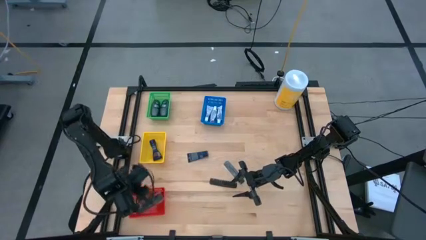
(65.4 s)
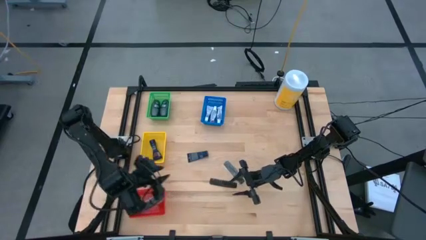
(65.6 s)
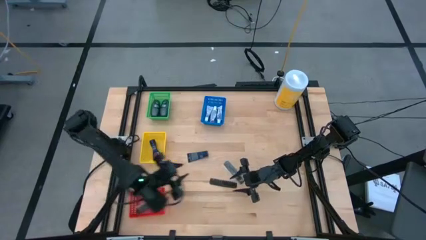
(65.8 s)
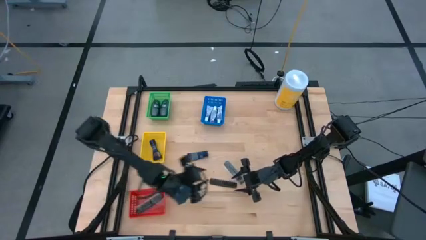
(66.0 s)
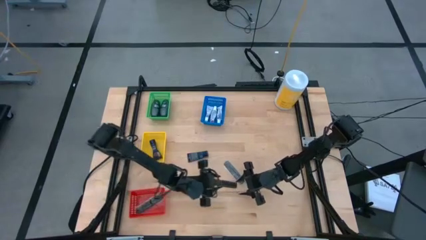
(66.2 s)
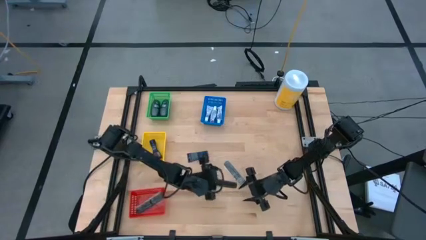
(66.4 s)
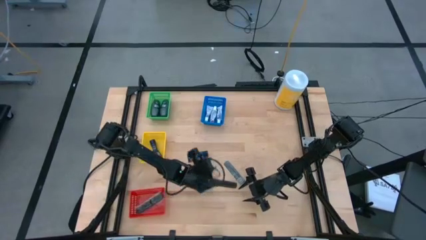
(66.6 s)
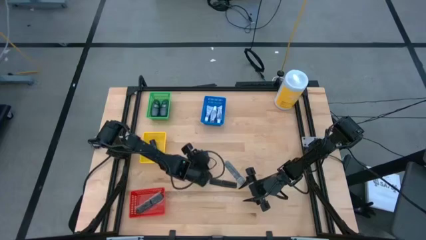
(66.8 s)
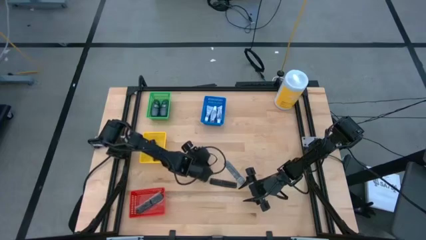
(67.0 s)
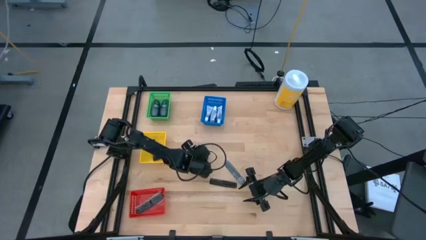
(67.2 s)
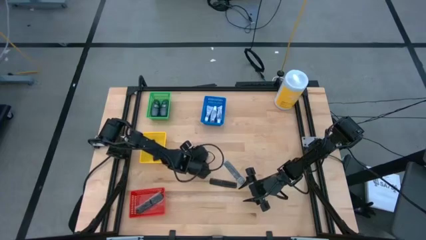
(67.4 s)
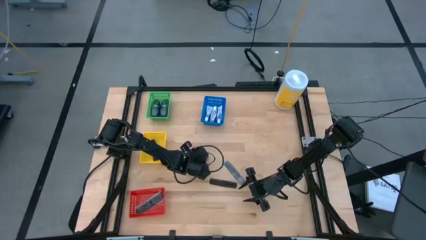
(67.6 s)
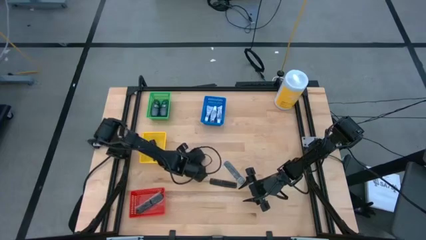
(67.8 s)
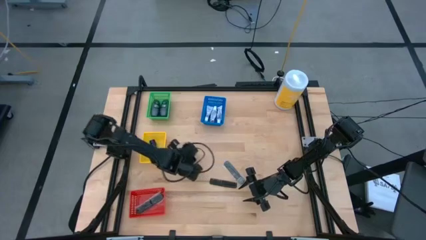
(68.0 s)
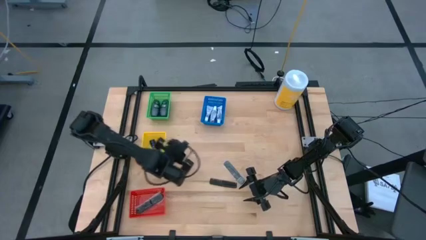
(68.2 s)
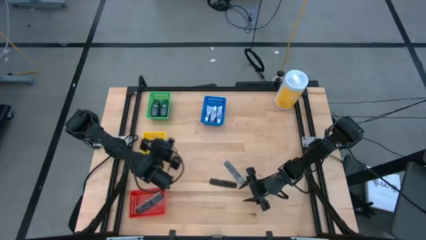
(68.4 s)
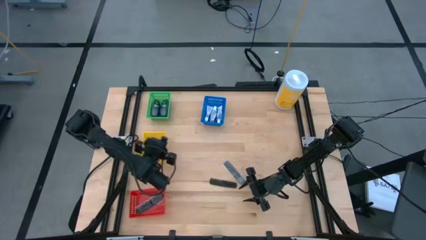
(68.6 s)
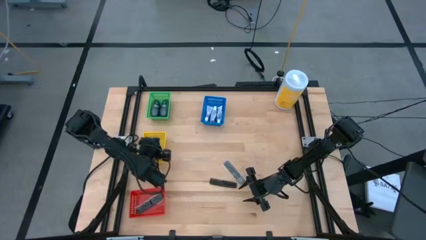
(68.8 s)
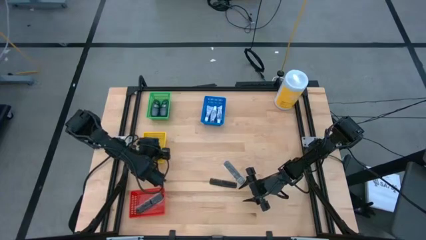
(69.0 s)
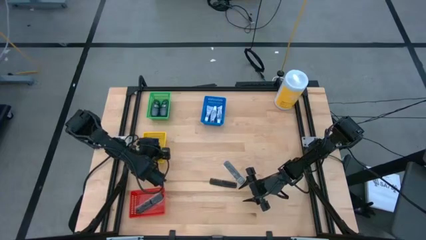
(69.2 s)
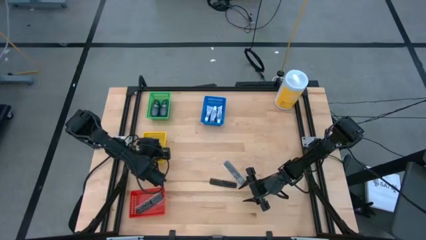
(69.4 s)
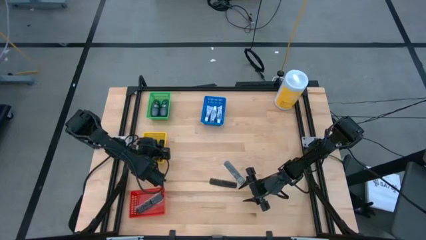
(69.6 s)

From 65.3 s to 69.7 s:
Task: Pick & Place Travel size toiletries
Put the blue shaving cream in the yellow basket

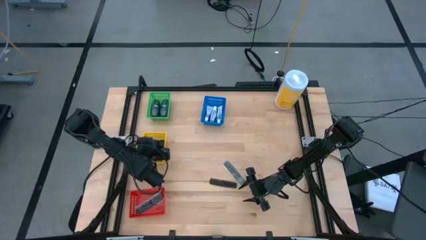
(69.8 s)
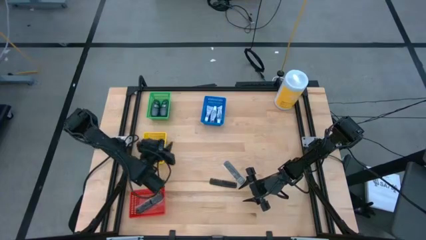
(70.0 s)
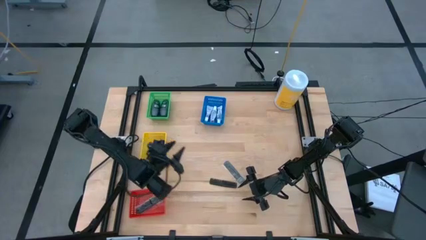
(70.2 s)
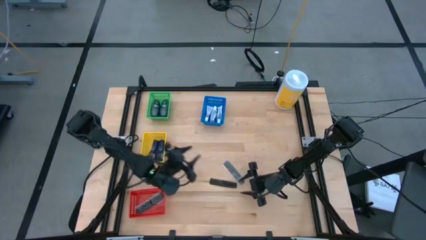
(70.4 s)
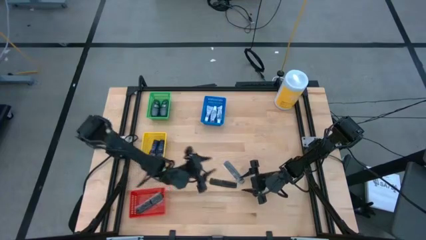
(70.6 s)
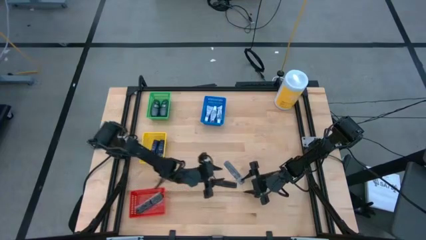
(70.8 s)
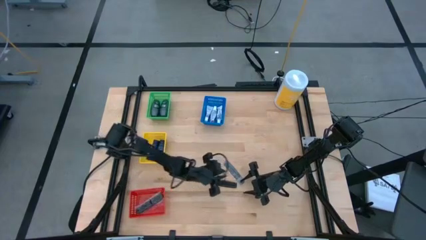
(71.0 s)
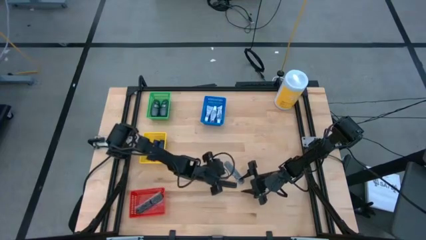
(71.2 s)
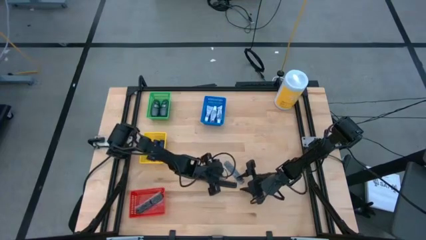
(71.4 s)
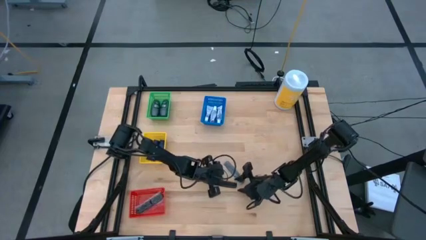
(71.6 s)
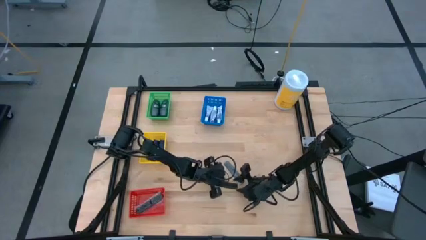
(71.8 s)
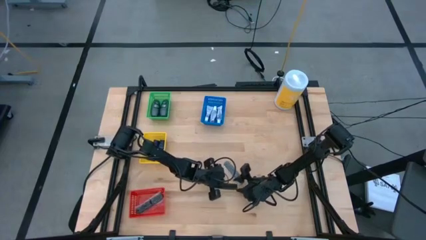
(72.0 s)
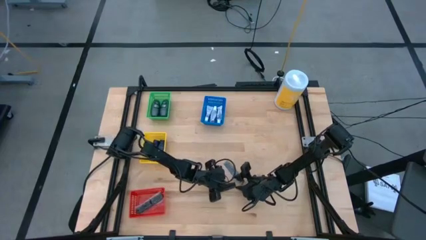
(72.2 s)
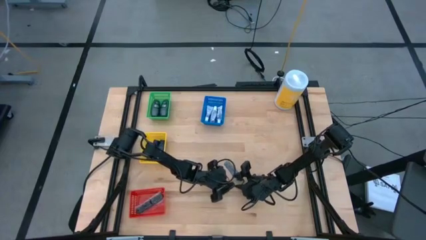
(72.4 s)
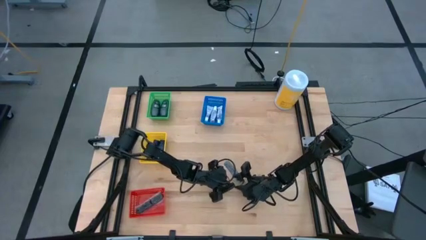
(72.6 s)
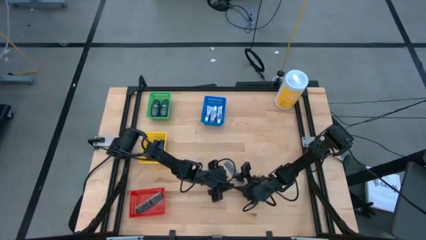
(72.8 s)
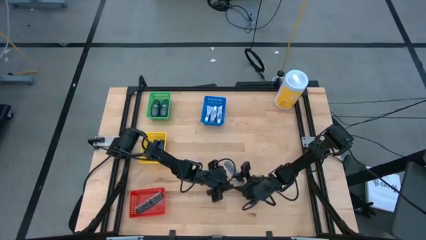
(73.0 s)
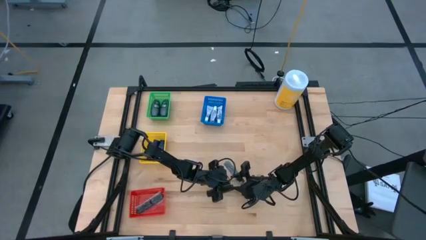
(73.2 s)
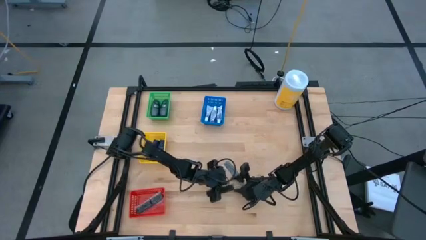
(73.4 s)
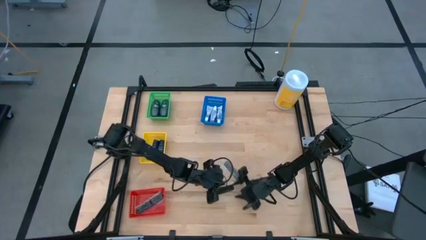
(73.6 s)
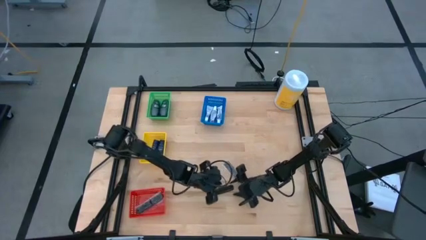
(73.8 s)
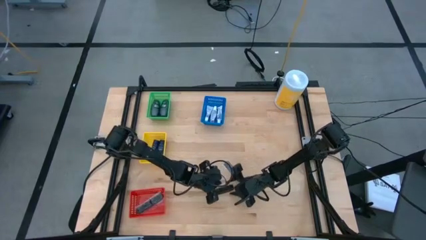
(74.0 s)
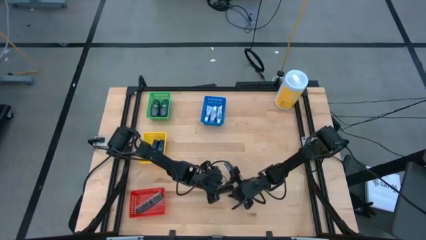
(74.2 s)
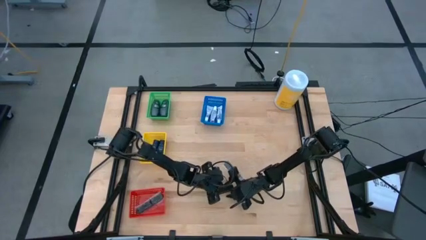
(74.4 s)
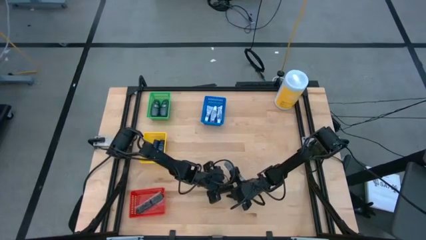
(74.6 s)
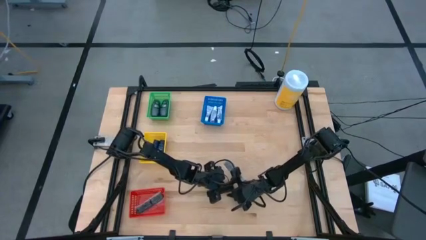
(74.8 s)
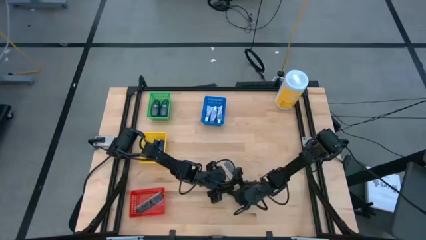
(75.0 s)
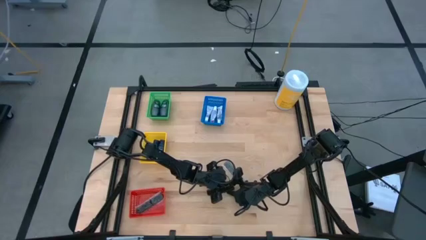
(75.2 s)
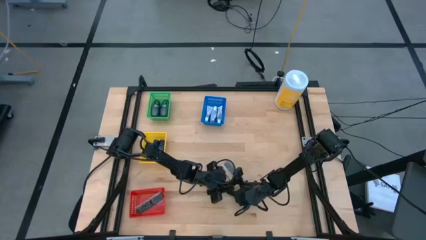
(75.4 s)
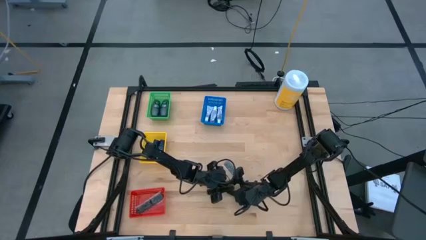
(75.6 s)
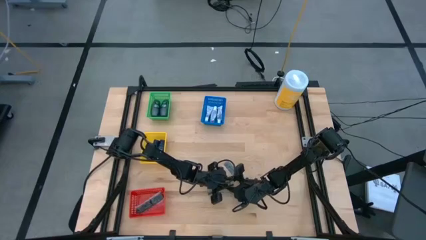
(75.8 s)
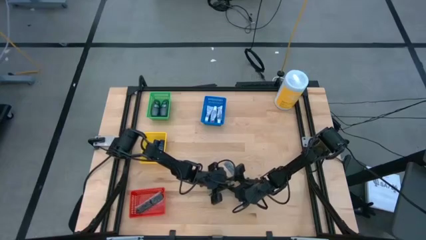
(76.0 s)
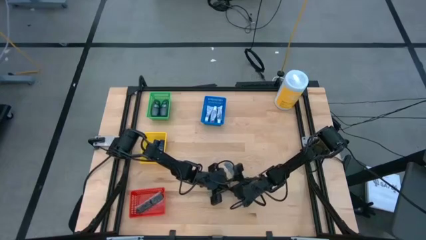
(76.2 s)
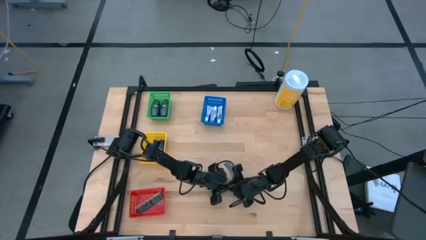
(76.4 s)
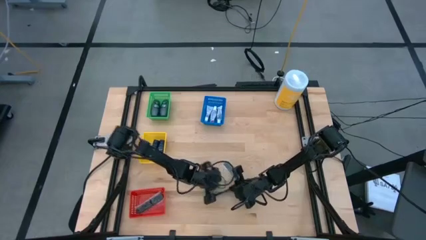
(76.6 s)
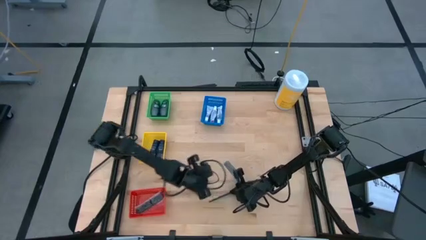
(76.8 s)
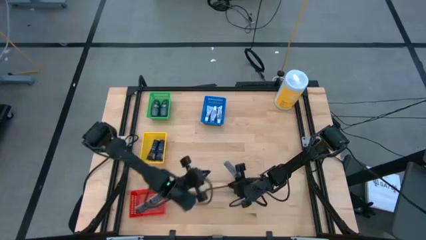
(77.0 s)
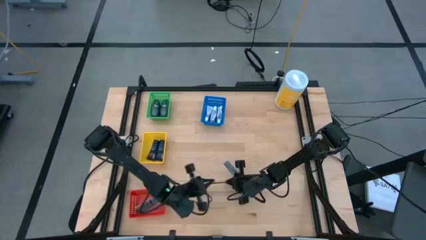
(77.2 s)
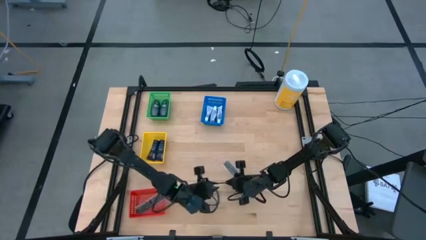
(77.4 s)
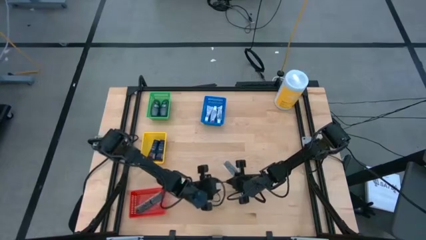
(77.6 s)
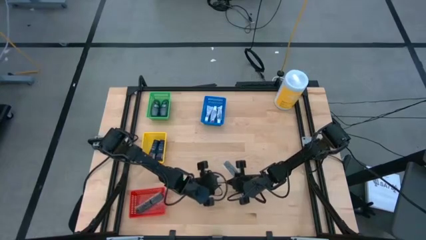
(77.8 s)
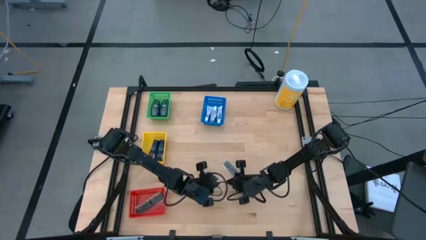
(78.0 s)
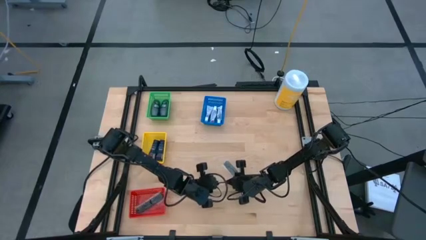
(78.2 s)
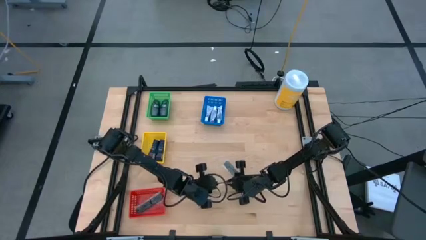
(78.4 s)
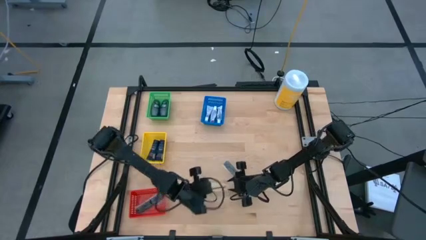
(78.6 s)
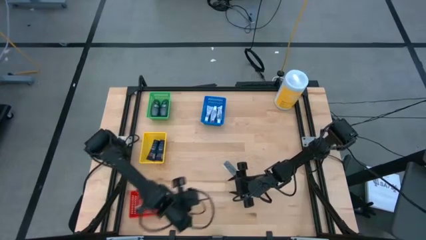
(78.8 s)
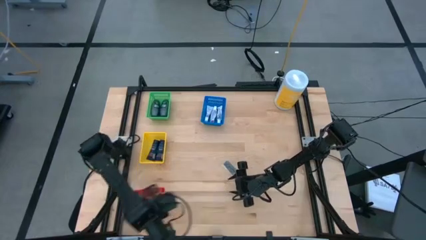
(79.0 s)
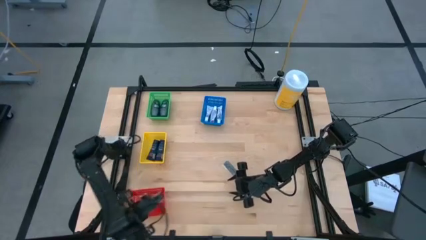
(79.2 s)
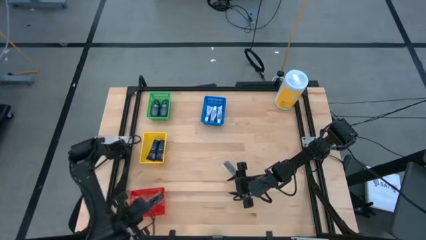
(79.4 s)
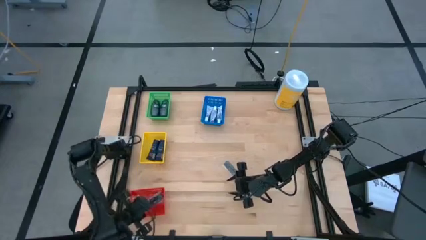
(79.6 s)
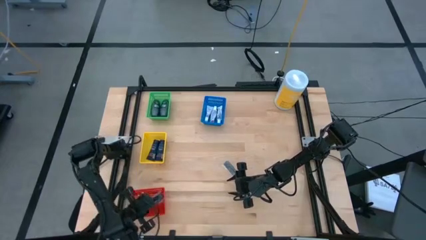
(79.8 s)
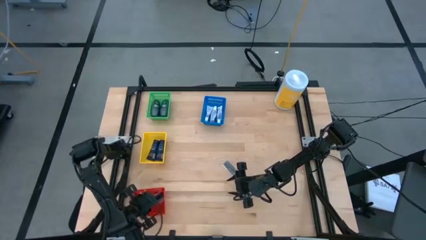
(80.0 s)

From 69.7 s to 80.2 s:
Put the black comb in the red basket

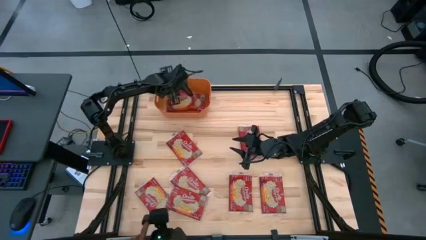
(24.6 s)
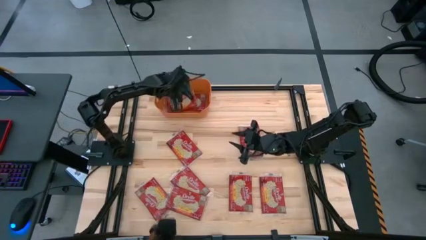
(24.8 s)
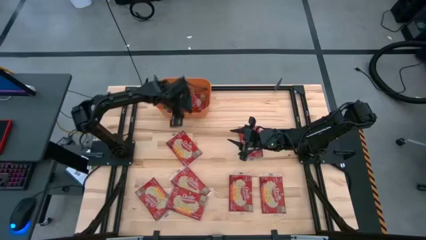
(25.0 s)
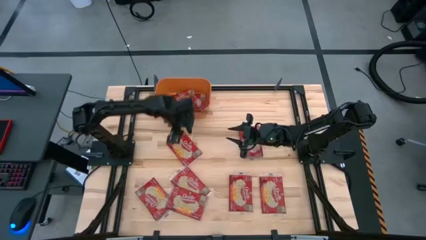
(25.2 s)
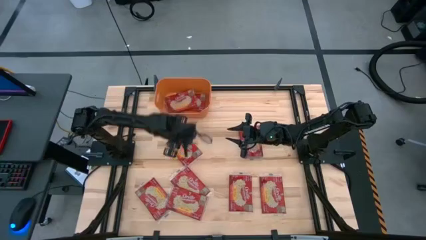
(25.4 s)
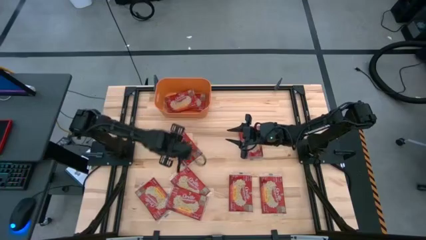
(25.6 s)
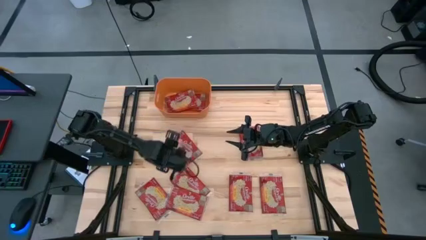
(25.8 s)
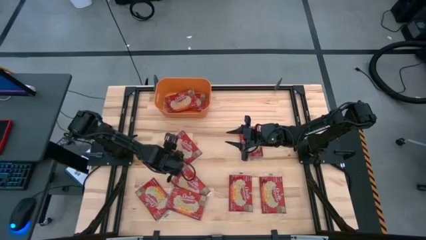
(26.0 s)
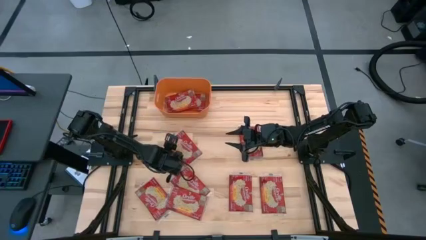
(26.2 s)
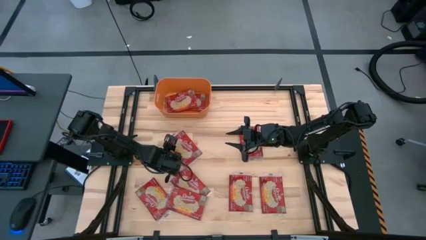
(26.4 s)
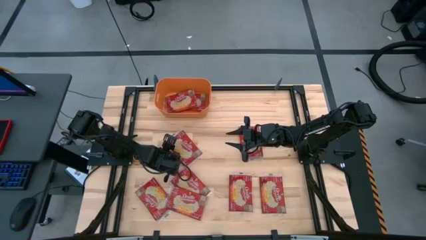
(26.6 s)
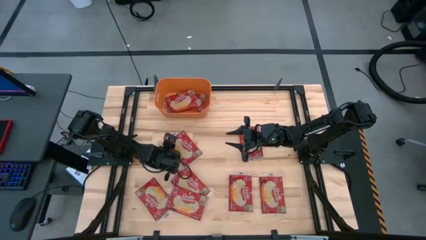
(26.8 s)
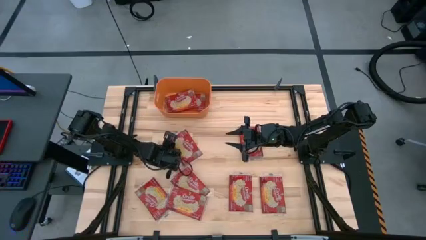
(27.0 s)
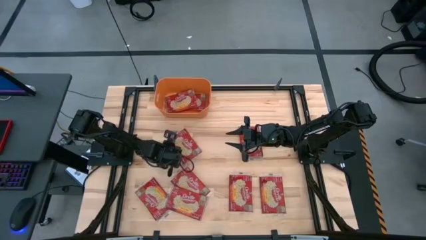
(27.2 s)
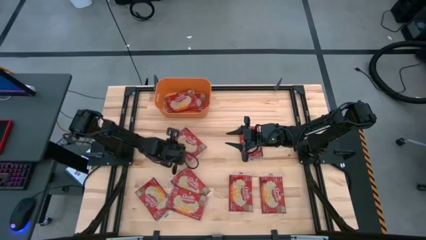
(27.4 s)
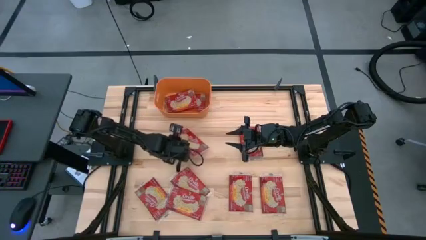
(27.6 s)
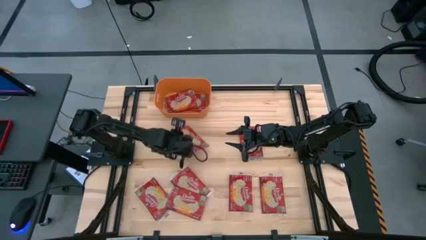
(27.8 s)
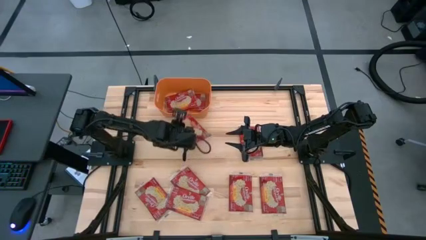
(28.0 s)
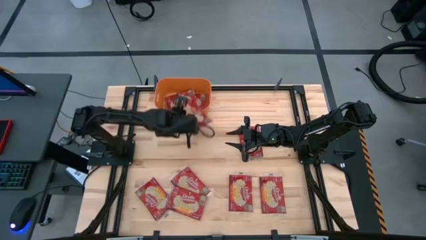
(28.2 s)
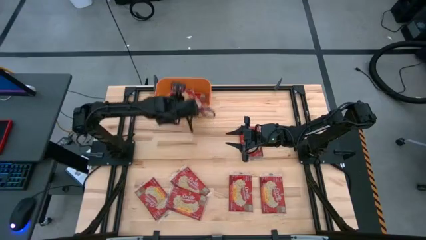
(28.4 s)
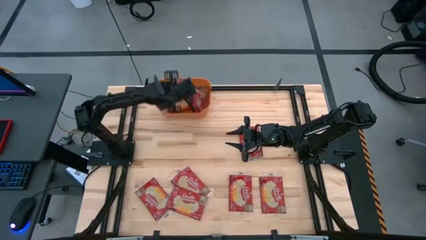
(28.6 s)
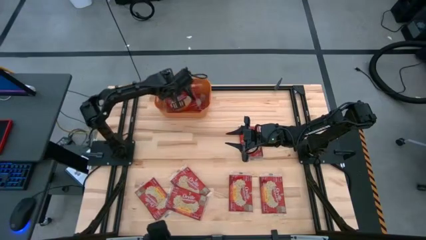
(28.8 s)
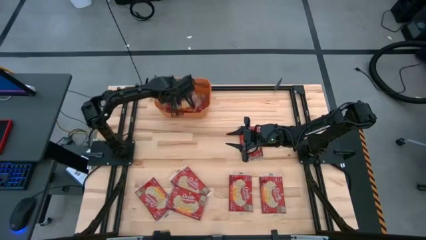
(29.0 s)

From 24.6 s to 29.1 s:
Task: Sort popcorn bags into baskets
Put the popcorn bag into the orange bin
